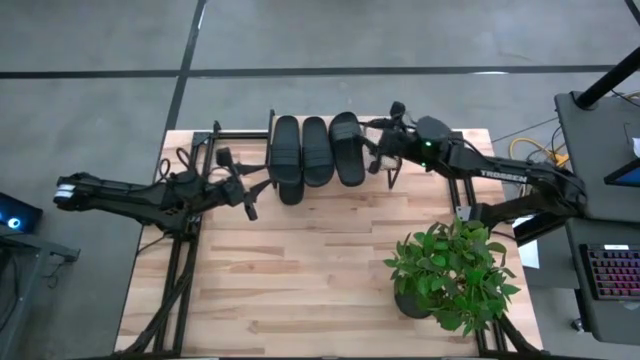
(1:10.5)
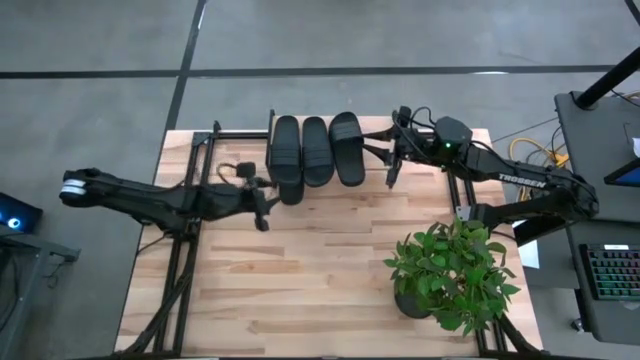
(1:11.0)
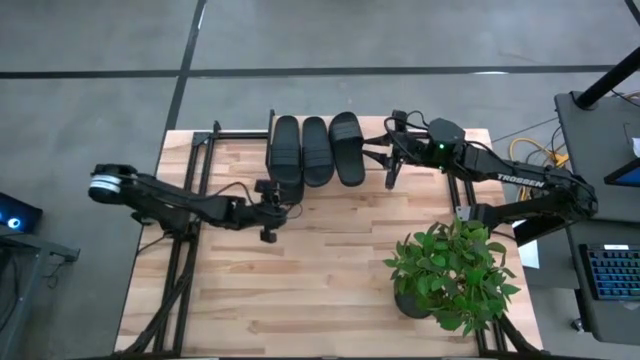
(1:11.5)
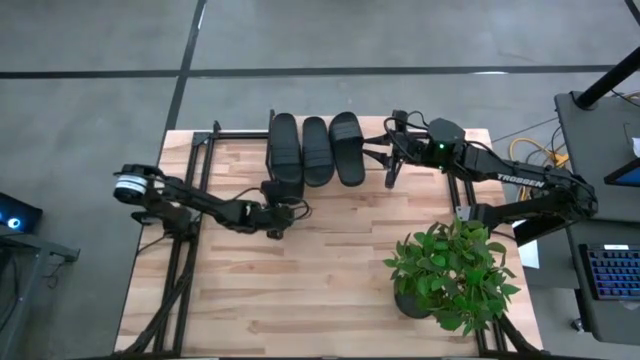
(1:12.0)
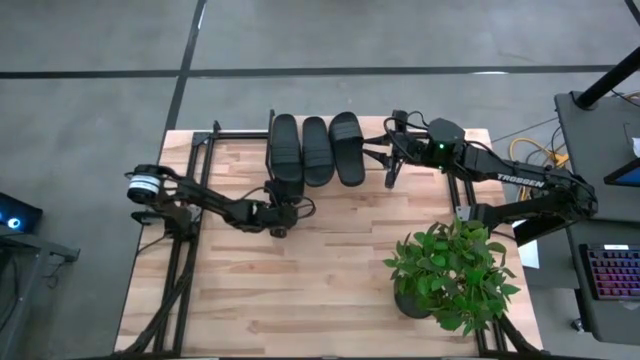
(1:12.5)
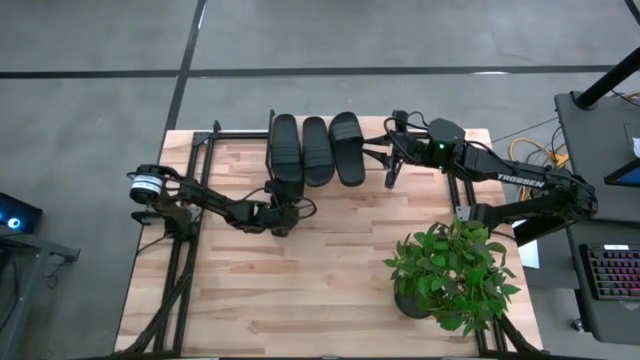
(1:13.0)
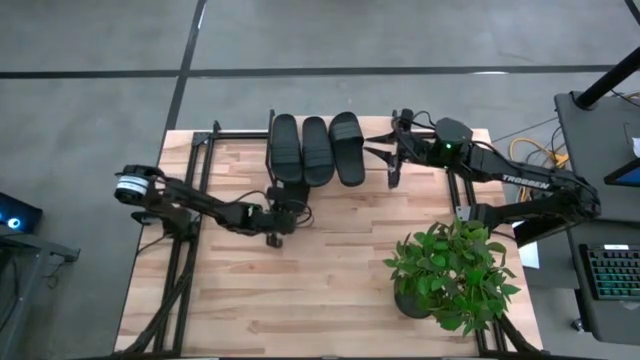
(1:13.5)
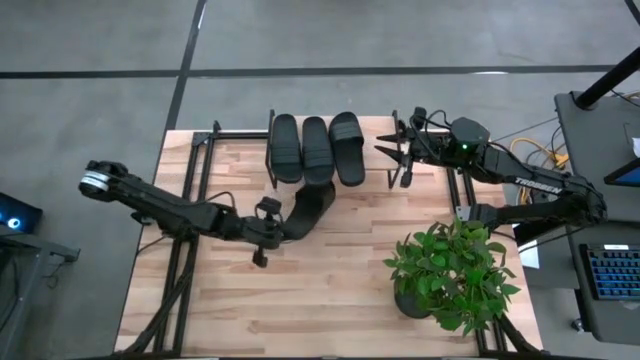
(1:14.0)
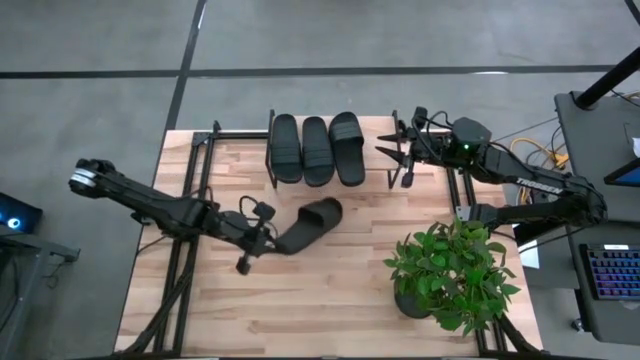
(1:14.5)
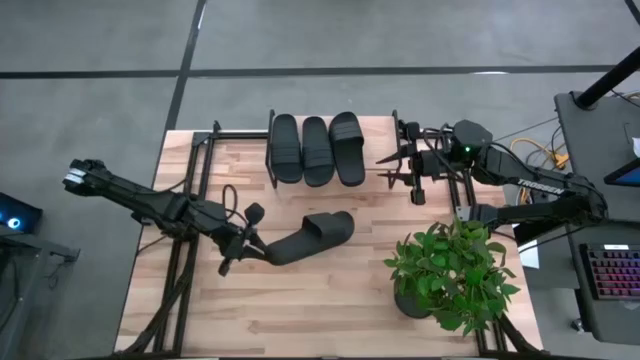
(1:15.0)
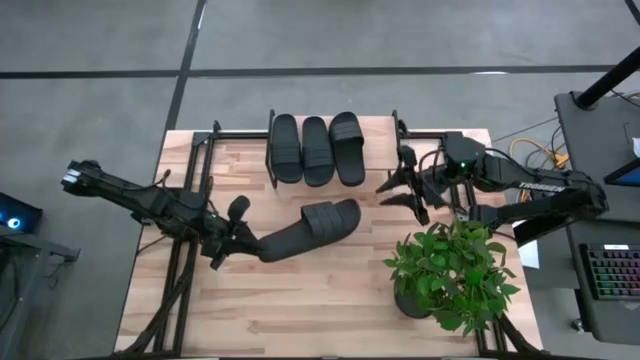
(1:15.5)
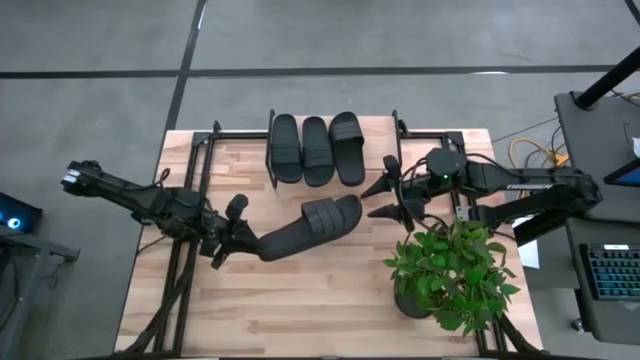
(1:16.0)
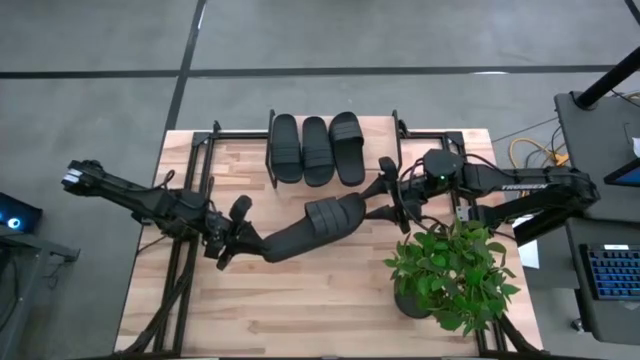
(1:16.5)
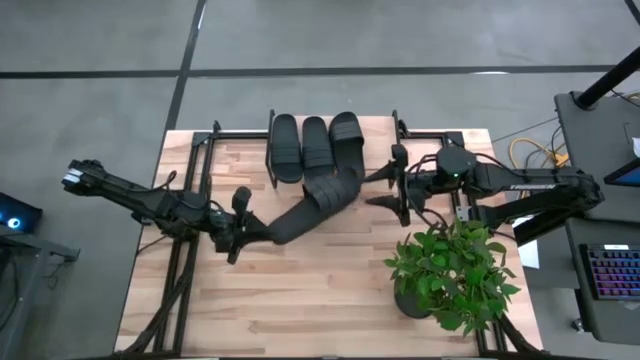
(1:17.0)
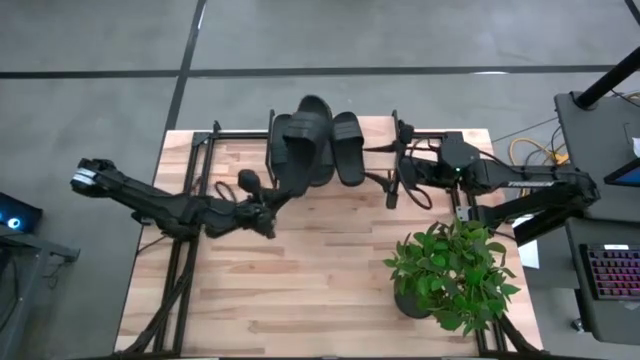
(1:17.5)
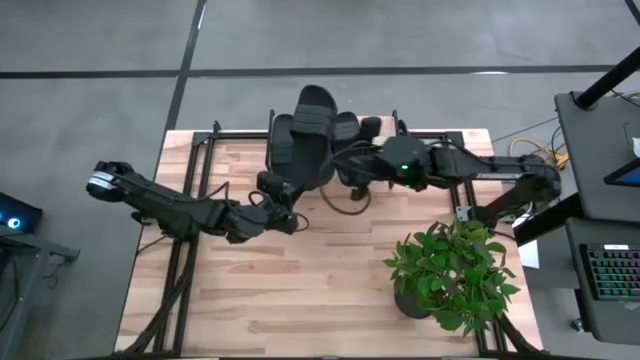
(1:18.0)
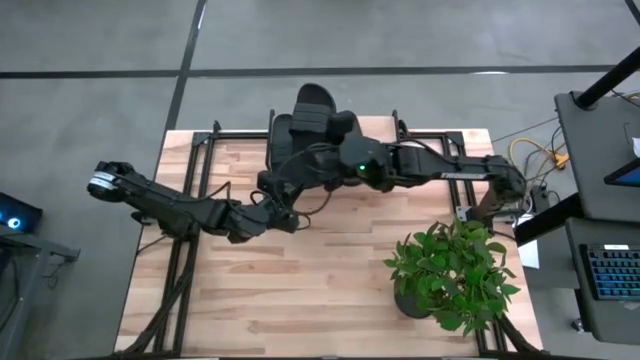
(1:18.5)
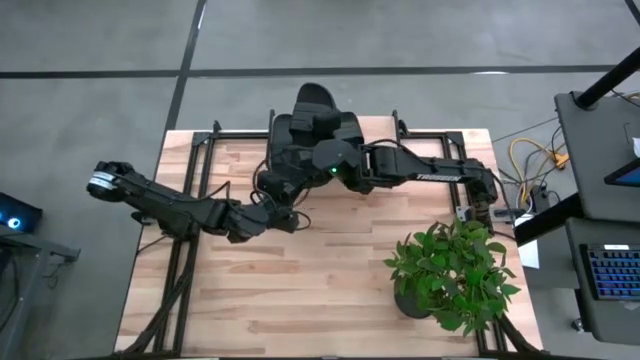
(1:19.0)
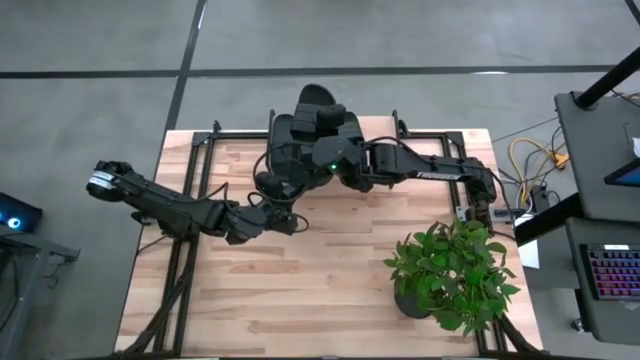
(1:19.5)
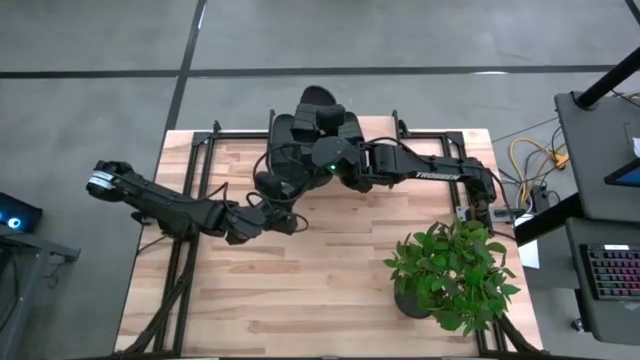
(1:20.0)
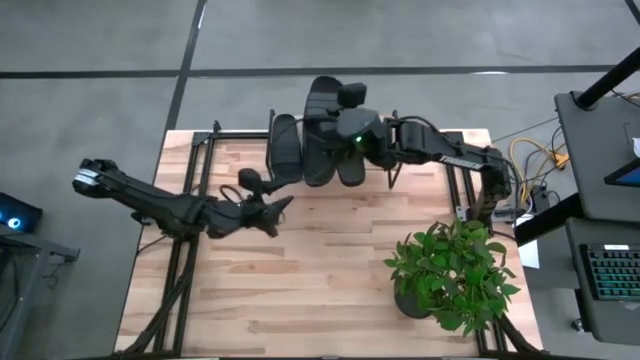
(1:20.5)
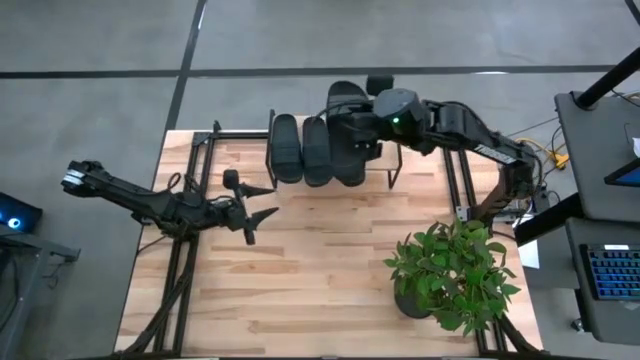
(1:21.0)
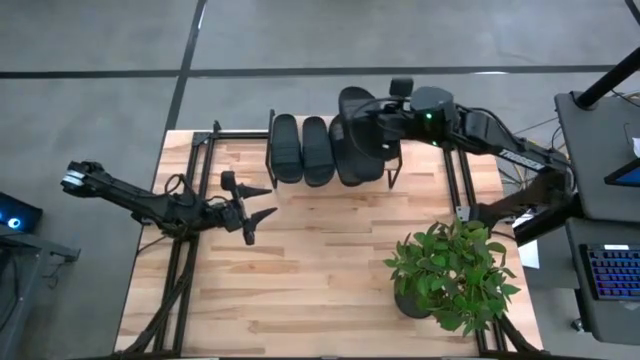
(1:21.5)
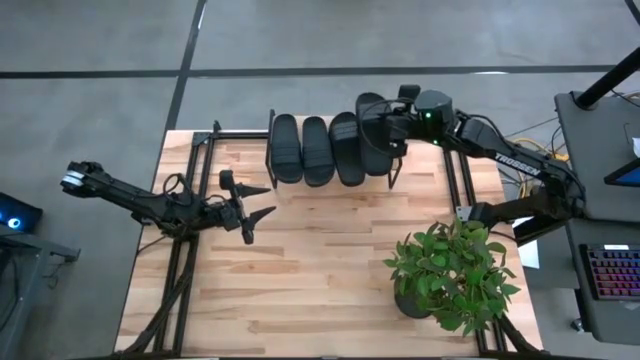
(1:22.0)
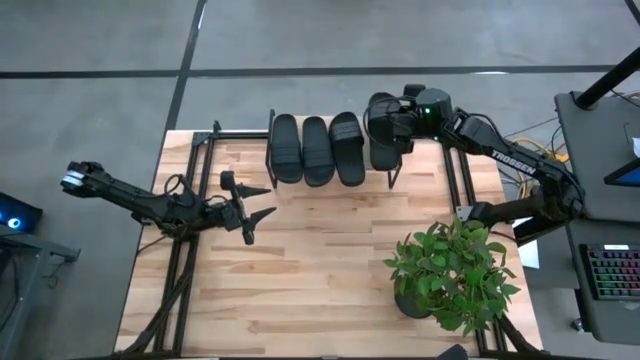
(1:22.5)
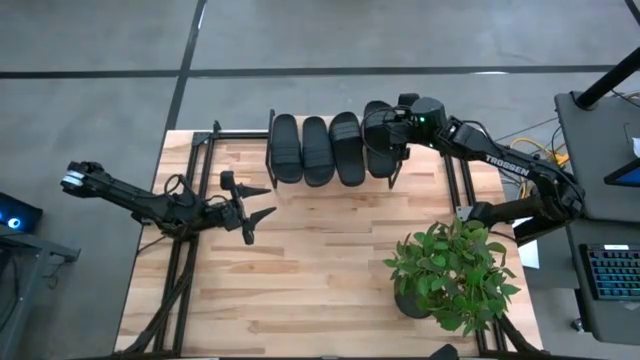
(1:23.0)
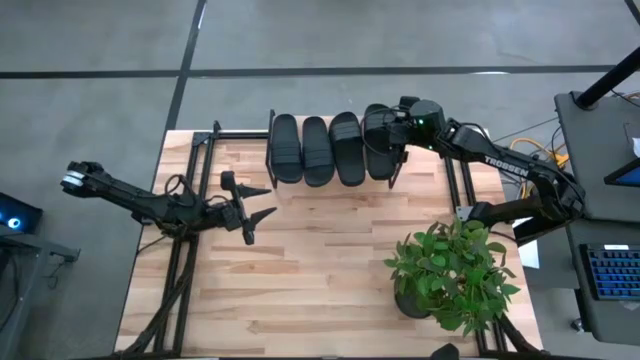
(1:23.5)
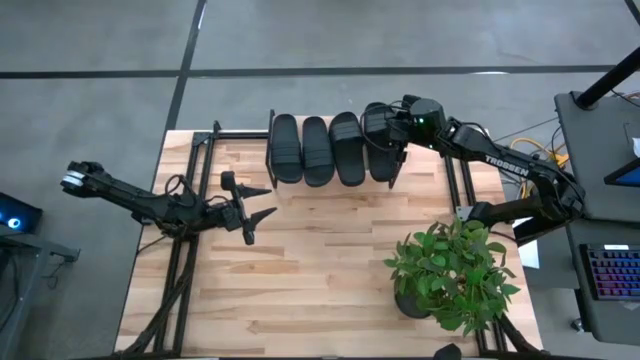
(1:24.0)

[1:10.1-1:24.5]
Task: Pick and place slides into the shelf
Put the black slipper on the shelf

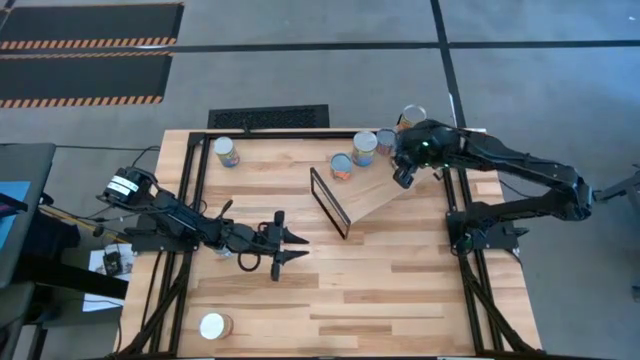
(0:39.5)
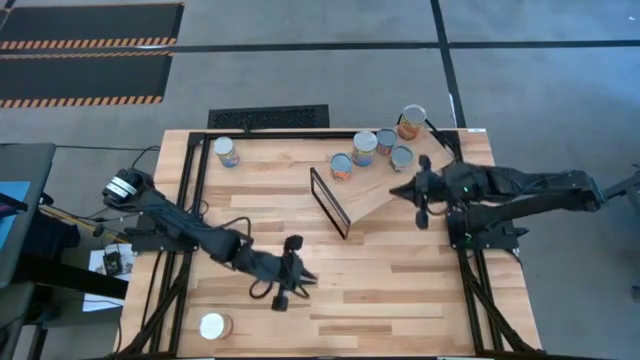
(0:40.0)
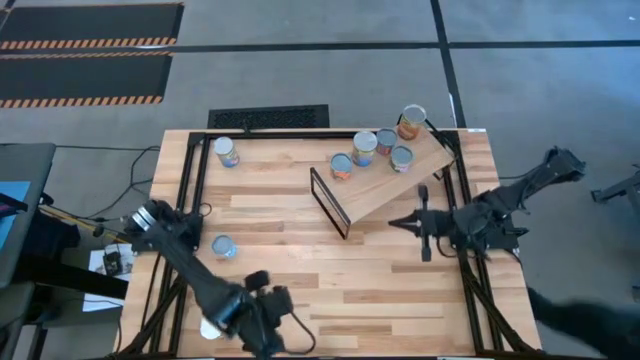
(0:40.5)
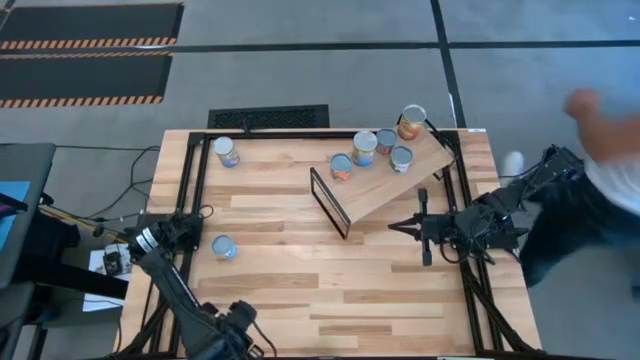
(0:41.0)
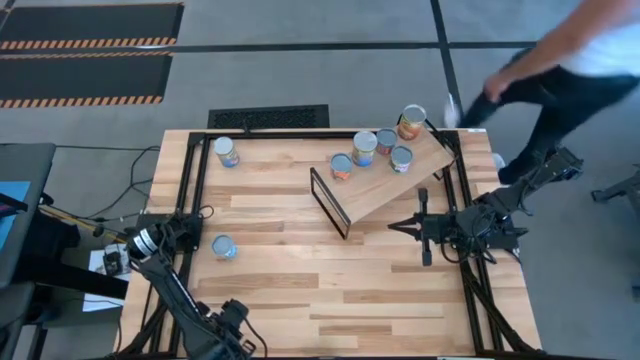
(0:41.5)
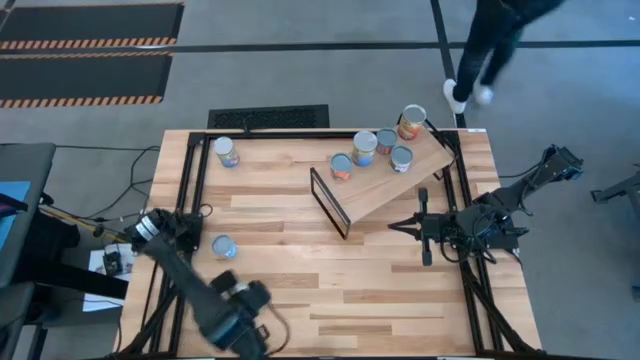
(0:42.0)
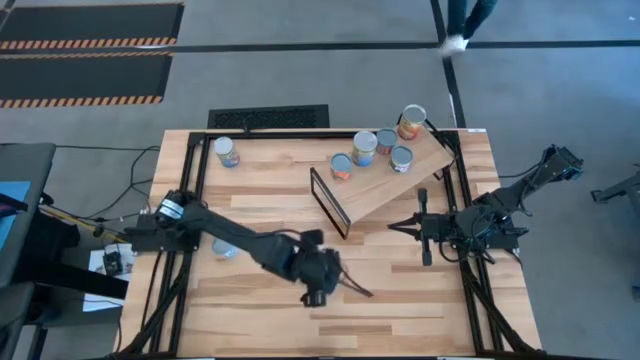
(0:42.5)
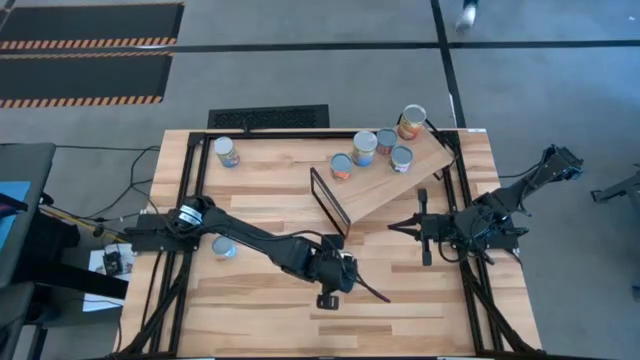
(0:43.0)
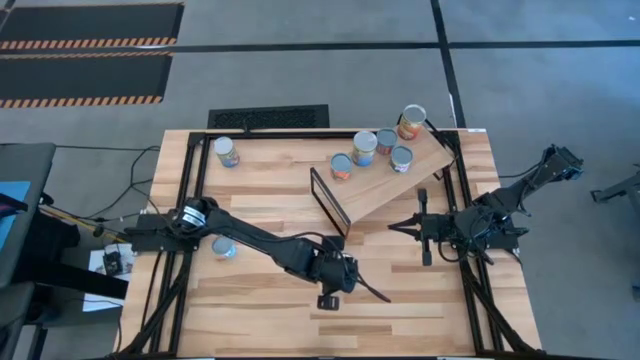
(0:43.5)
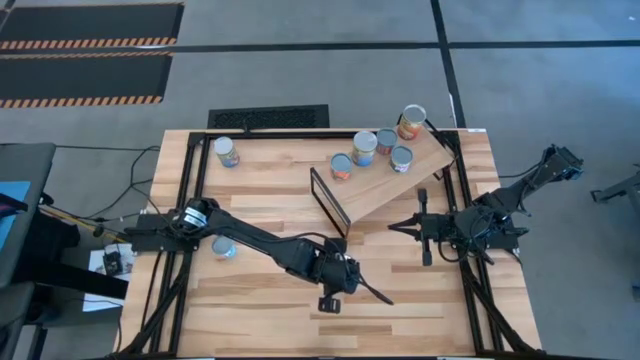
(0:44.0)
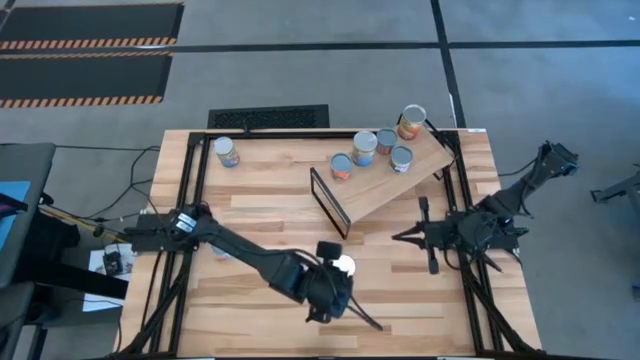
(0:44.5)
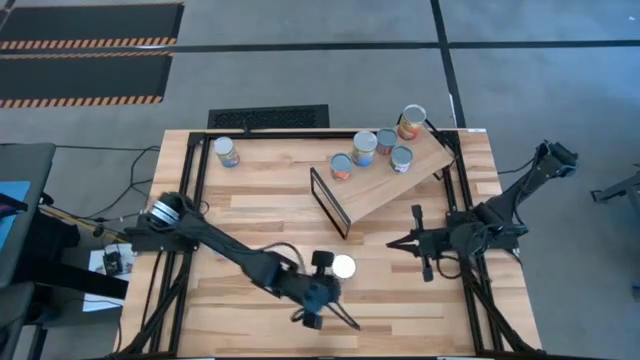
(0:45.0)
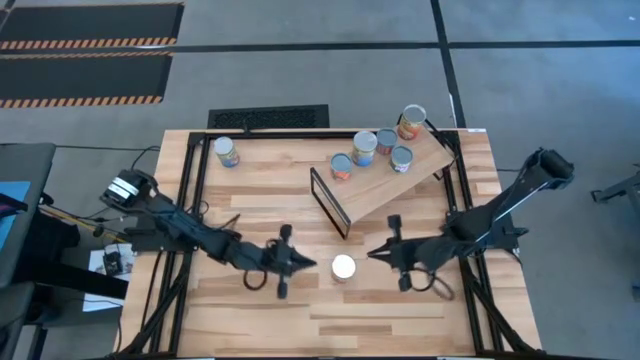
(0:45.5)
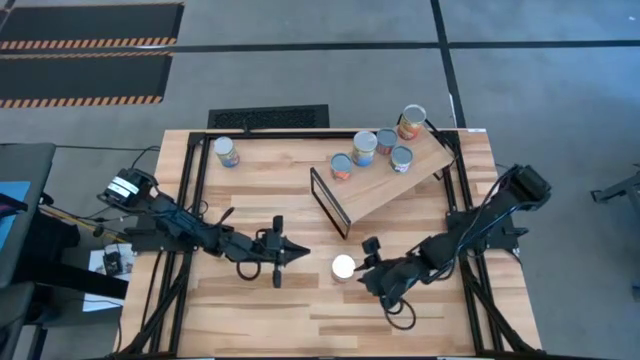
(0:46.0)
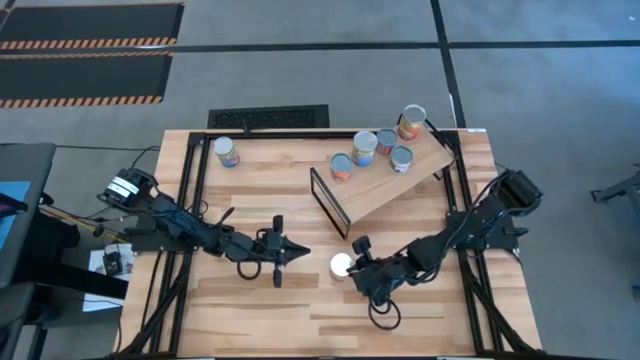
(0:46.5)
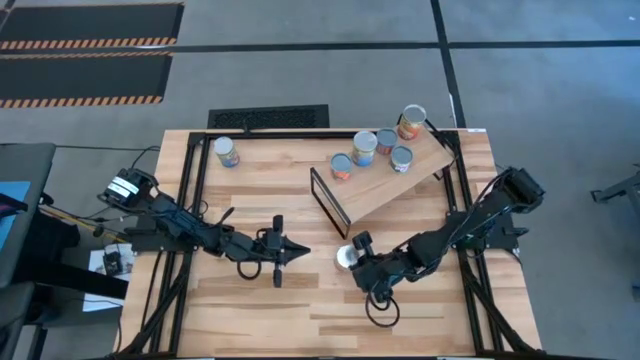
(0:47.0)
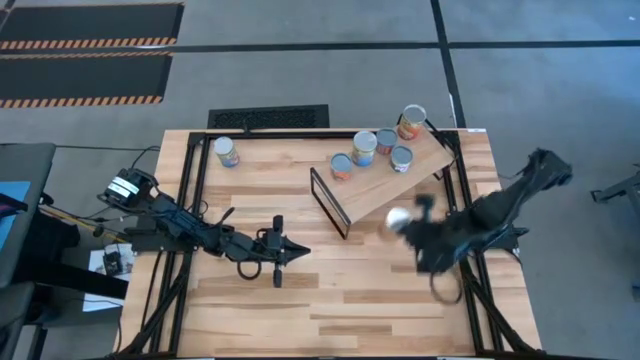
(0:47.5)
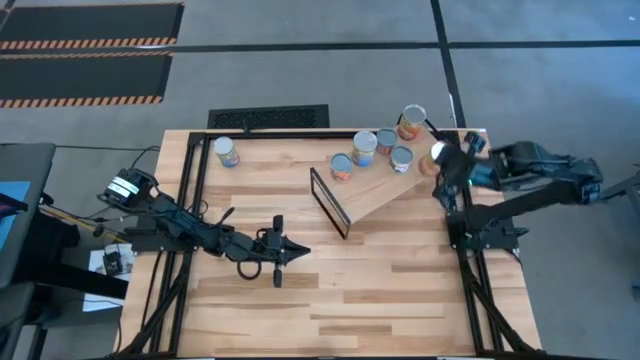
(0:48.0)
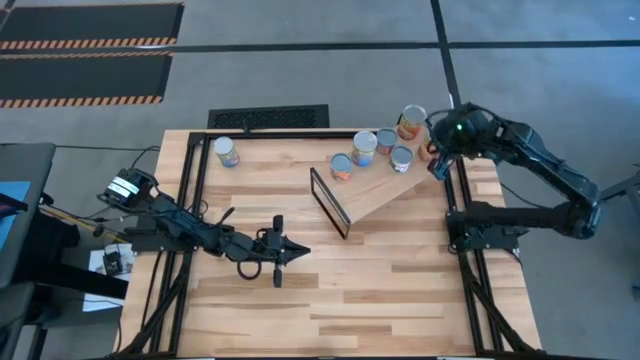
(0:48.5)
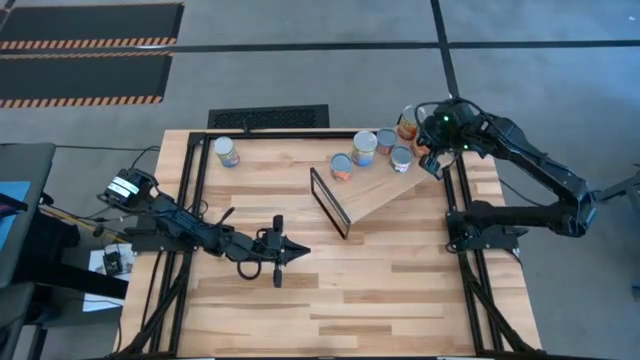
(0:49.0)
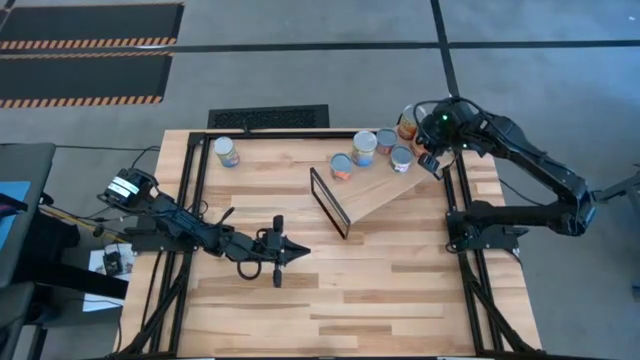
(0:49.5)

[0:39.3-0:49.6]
Task: Pick and place cans onto a shelf
Put the canned corn on the shelf aligned with the other canned corn
